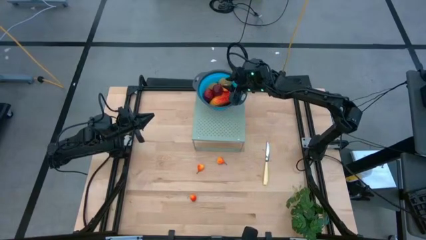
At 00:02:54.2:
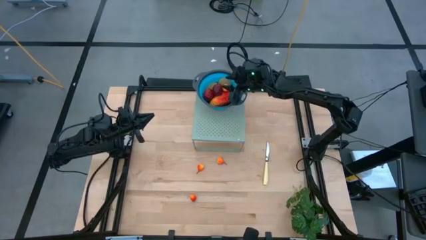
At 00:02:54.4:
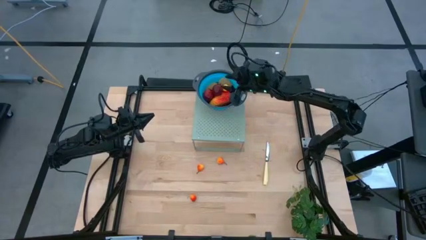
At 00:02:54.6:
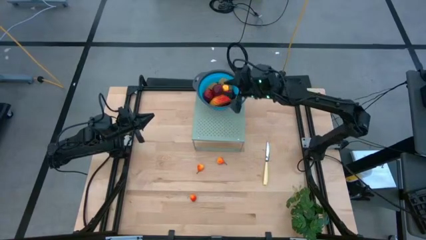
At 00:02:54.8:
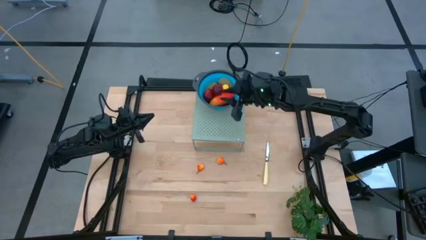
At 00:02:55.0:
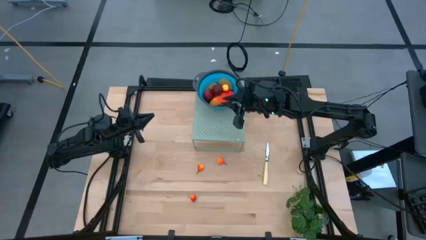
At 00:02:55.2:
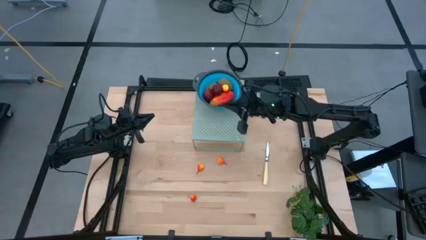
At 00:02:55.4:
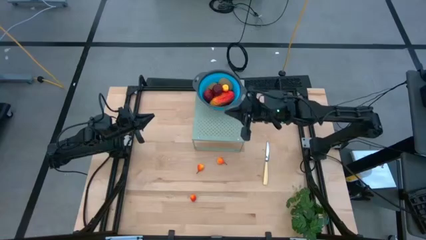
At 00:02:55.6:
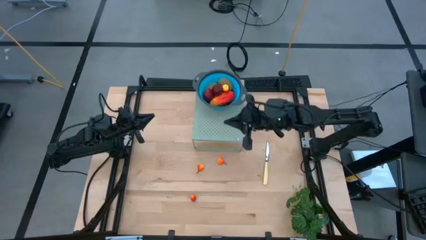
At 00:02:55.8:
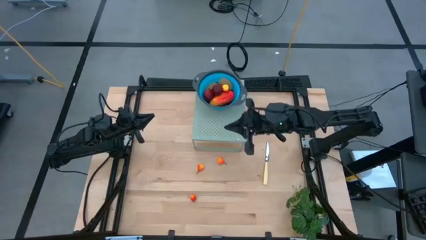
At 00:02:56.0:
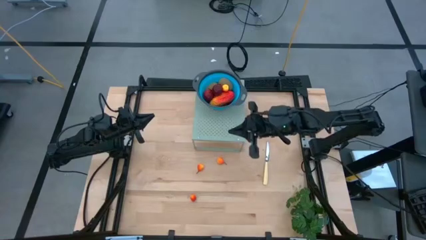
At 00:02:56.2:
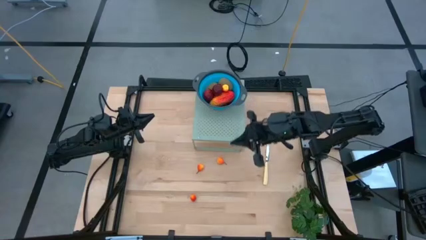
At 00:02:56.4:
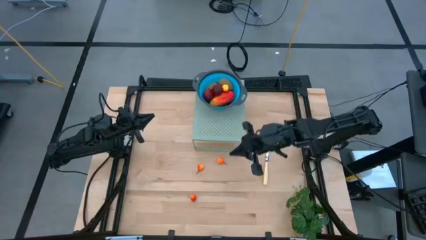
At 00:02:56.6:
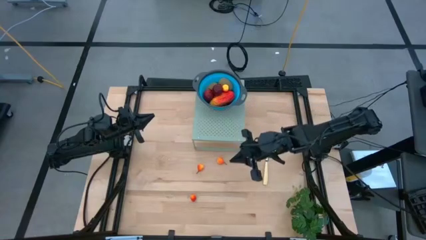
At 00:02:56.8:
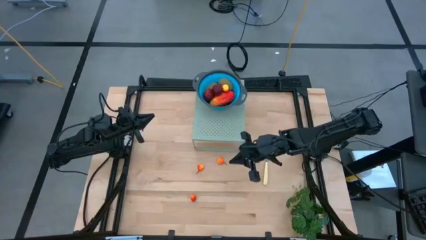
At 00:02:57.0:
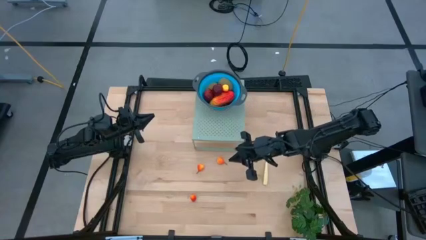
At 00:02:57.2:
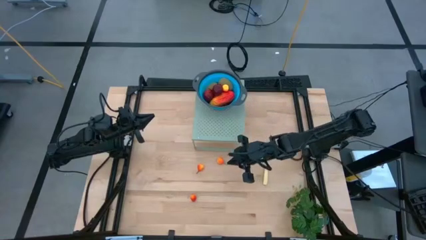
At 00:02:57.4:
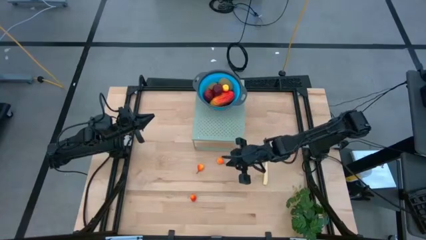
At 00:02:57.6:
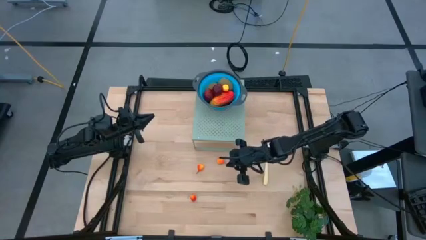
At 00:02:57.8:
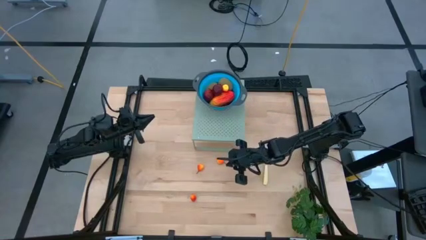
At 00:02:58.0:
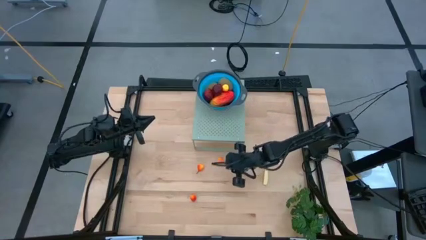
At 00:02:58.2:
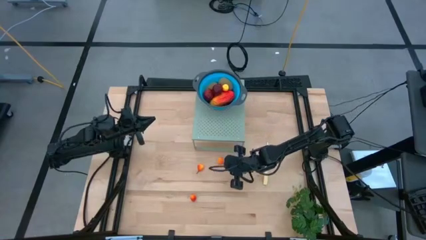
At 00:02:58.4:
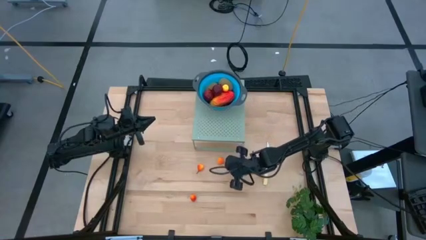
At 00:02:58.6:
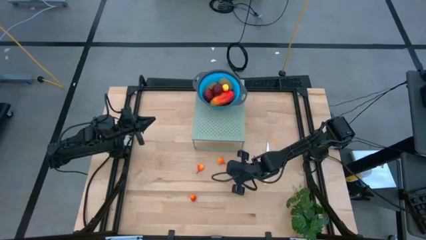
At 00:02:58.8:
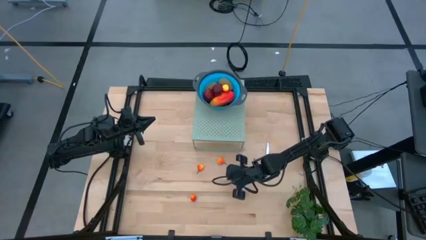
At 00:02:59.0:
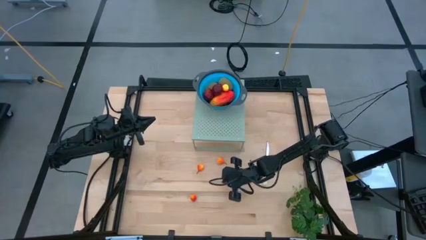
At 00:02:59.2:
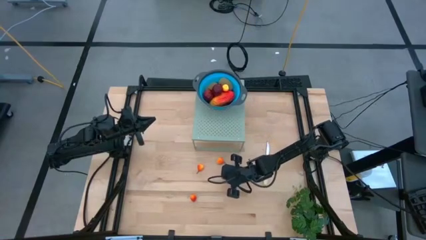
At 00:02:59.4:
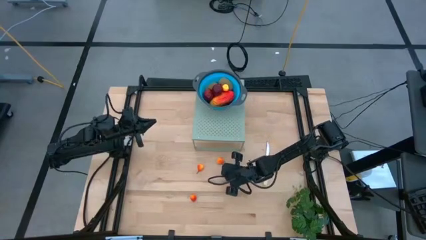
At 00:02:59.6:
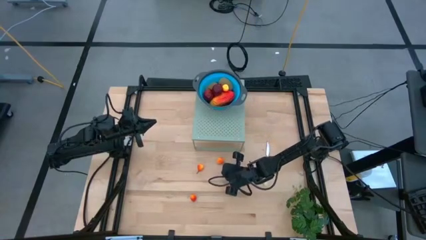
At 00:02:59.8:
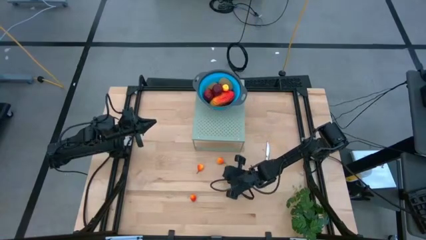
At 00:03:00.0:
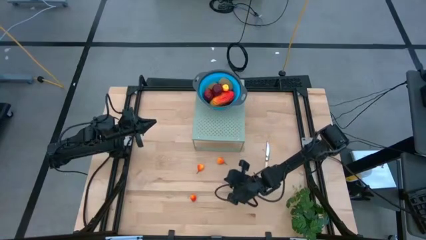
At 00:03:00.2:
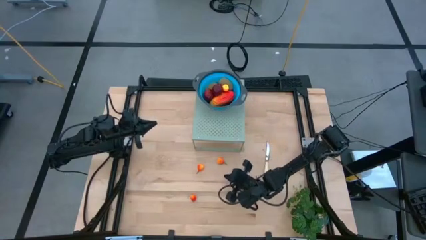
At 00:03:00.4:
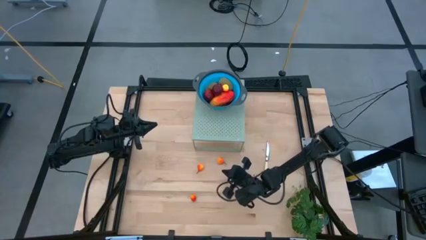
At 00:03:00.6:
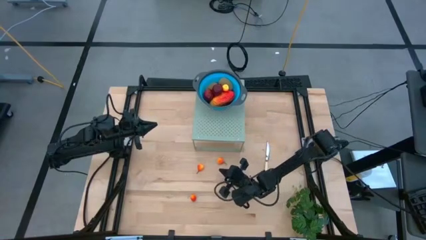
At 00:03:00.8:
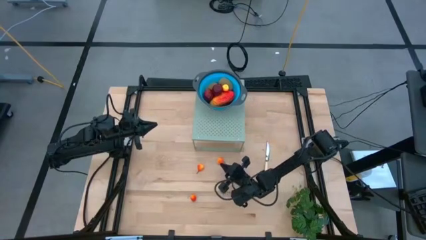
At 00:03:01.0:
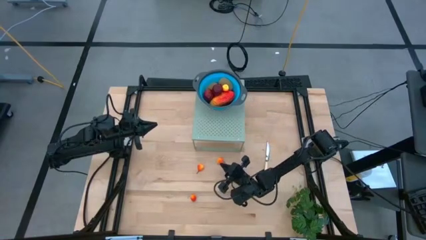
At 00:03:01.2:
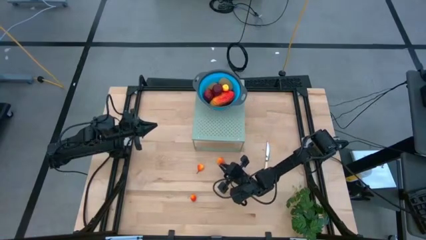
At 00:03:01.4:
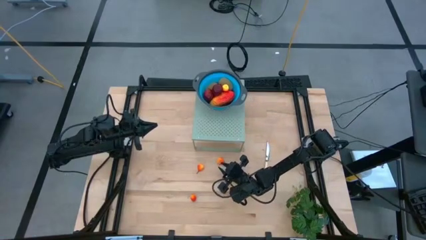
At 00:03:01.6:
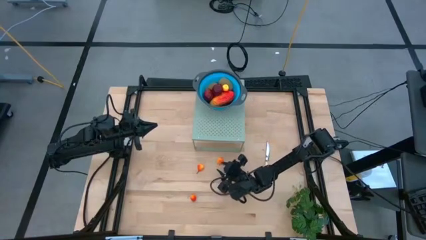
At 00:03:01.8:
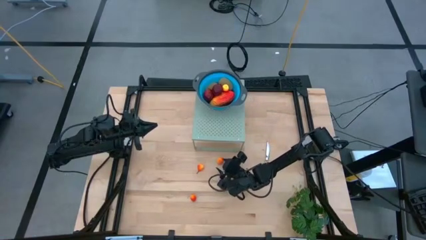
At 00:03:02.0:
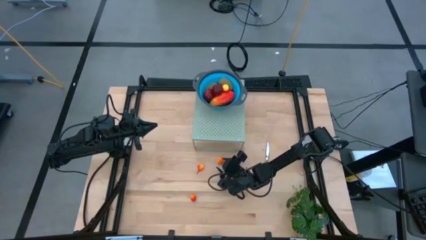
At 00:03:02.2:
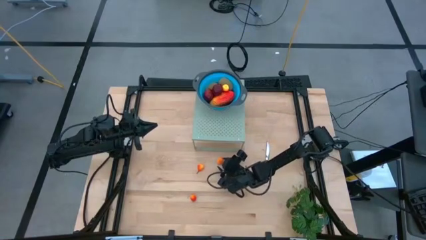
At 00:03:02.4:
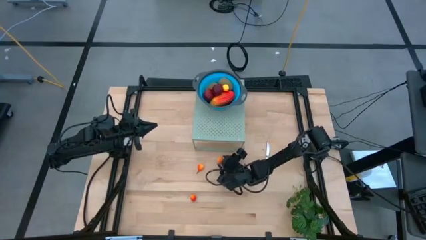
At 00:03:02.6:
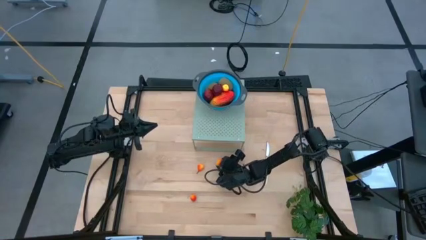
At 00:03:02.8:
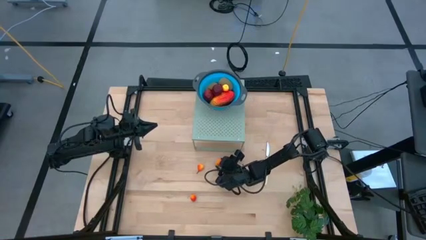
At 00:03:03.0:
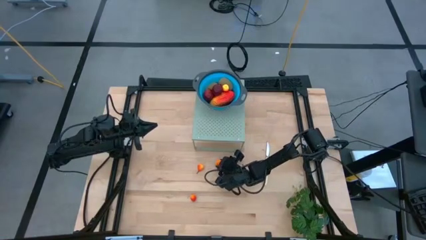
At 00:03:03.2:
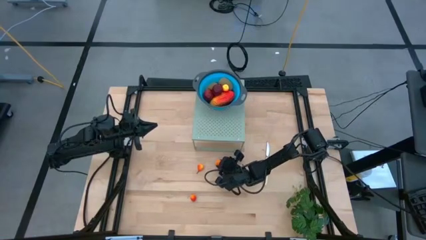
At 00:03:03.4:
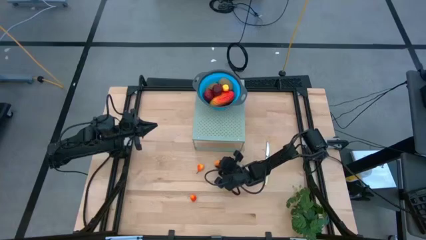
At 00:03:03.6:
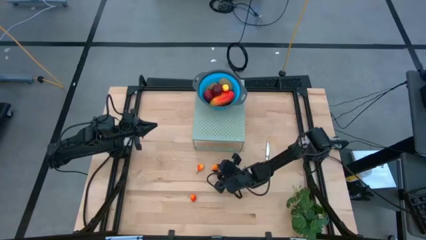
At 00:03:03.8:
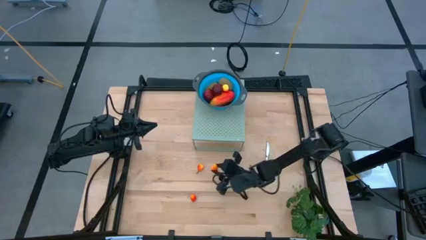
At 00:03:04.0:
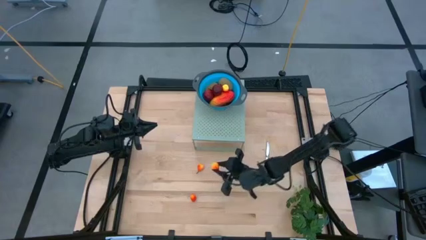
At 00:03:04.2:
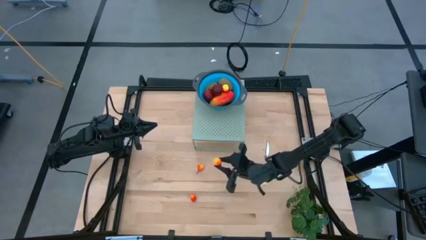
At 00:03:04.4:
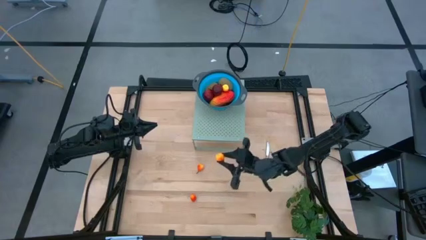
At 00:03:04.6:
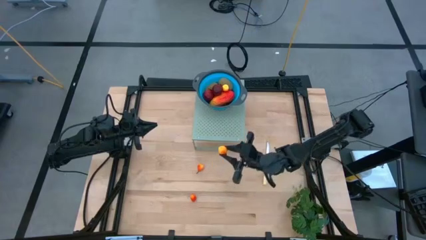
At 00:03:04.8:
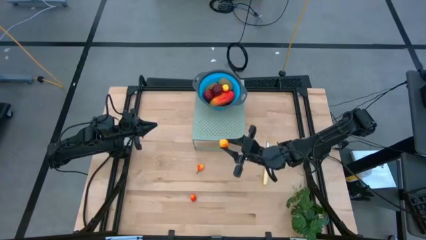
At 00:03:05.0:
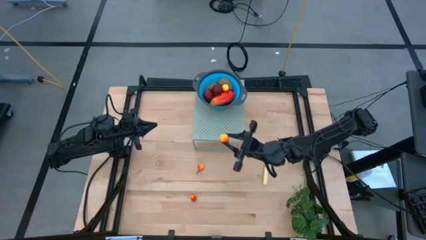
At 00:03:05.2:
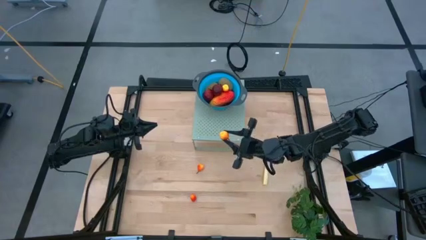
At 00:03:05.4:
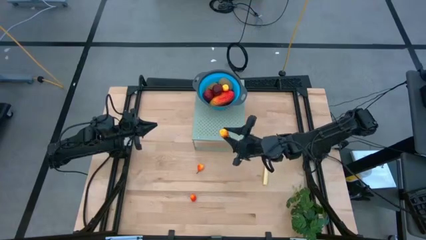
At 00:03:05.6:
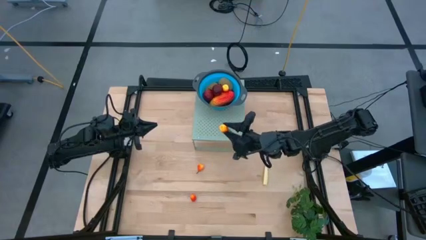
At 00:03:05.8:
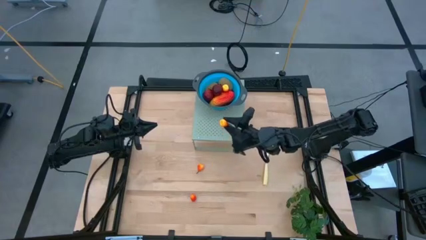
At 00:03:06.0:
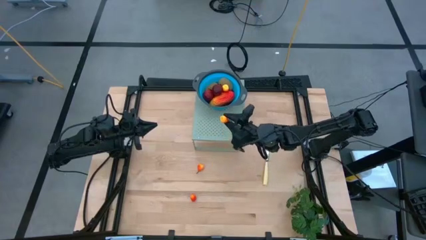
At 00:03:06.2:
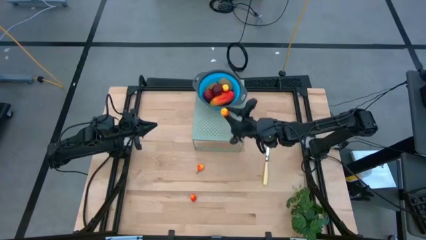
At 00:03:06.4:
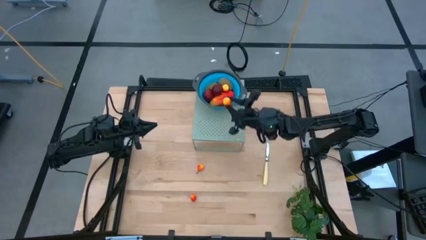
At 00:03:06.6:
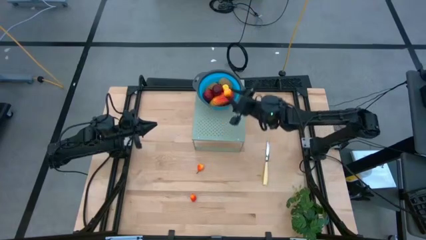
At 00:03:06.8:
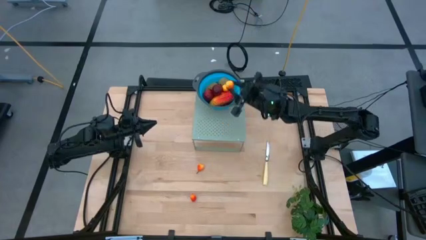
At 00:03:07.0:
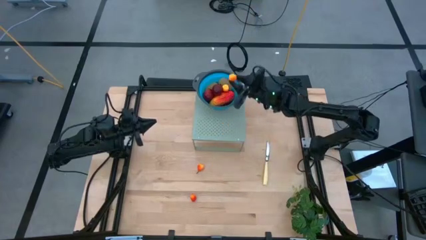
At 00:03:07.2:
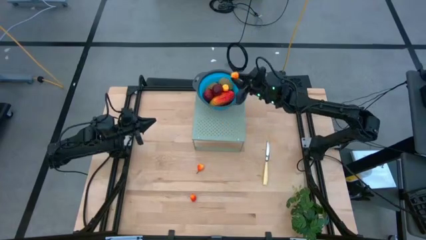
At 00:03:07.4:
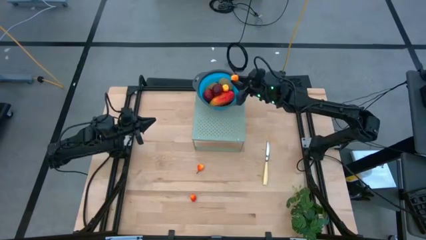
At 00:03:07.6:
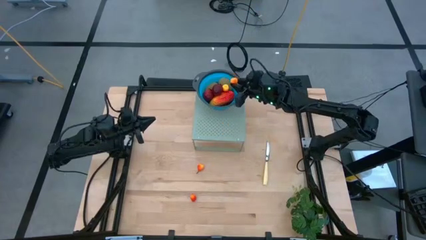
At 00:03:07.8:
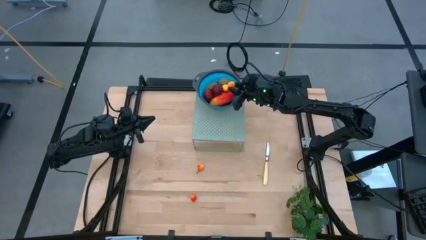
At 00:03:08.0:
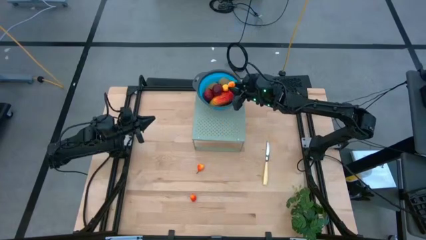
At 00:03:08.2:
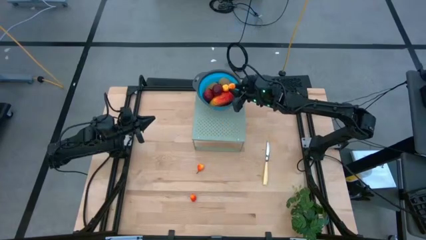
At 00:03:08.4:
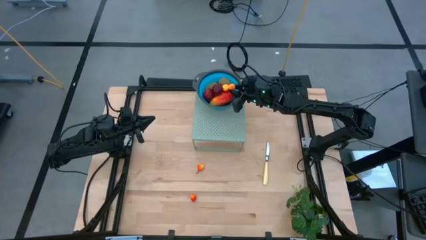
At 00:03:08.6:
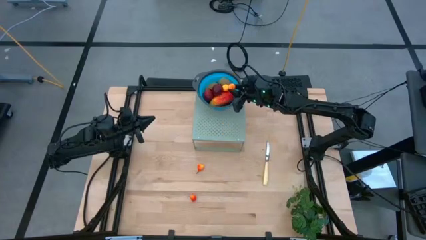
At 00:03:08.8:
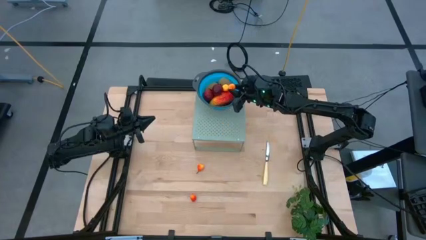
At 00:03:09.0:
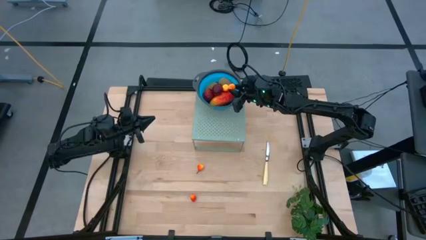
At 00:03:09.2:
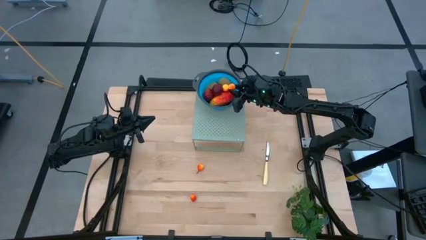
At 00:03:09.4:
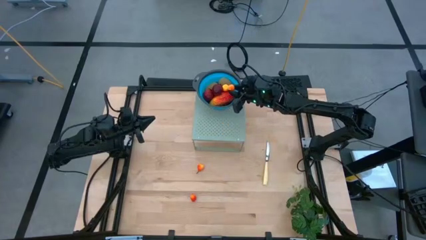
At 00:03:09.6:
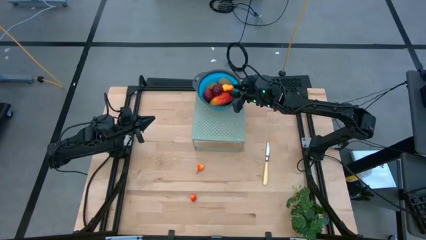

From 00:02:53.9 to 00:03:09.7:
Task: Pick & Place Fruit
Put the peach into the blue strainer bowl on the shelf
